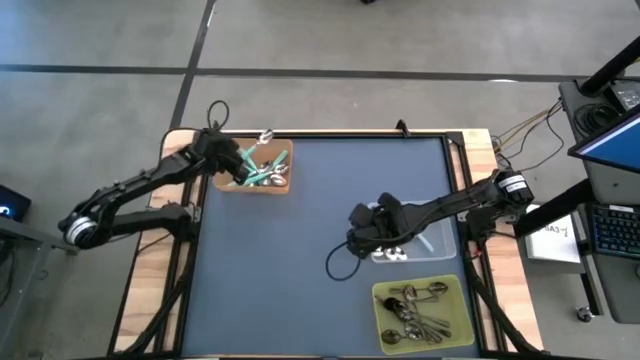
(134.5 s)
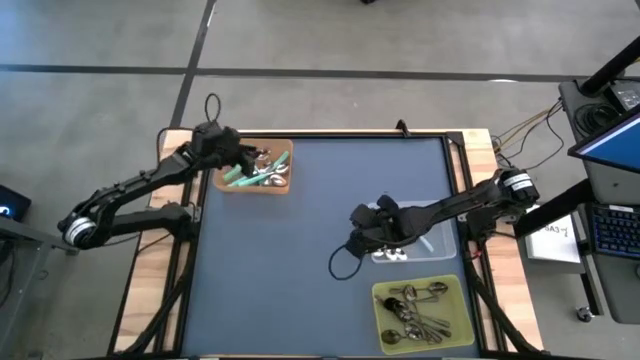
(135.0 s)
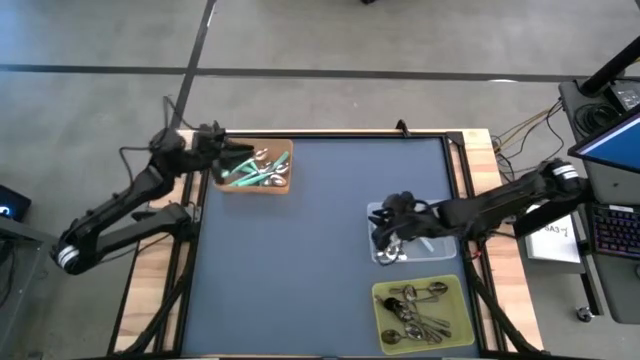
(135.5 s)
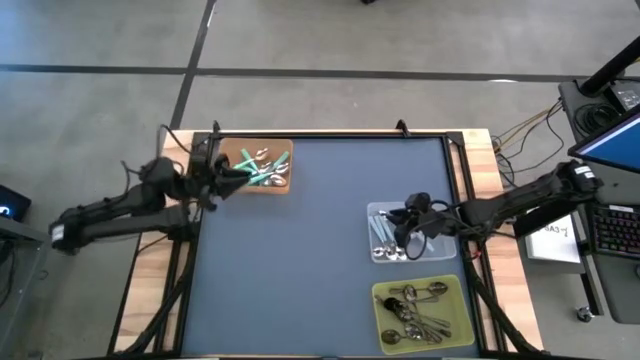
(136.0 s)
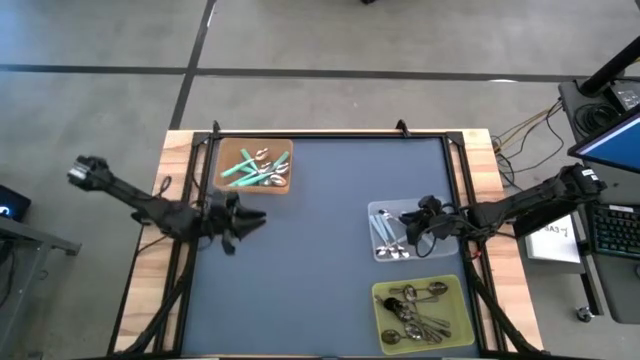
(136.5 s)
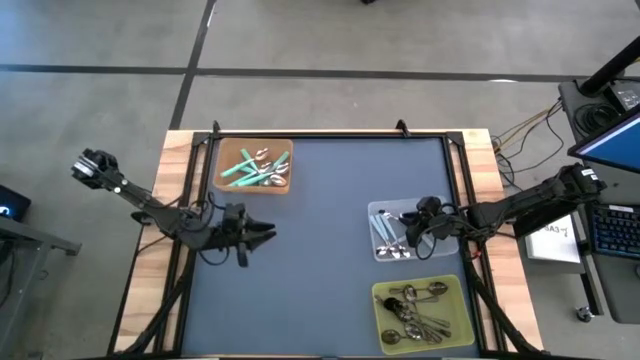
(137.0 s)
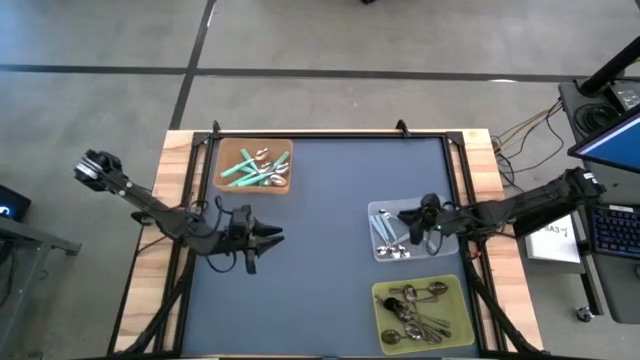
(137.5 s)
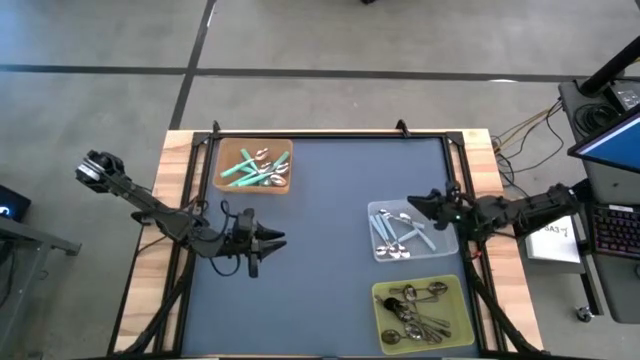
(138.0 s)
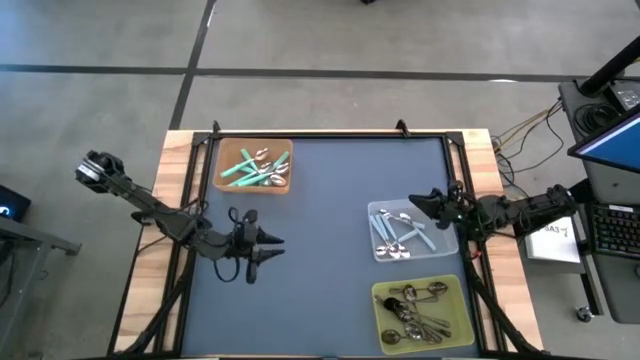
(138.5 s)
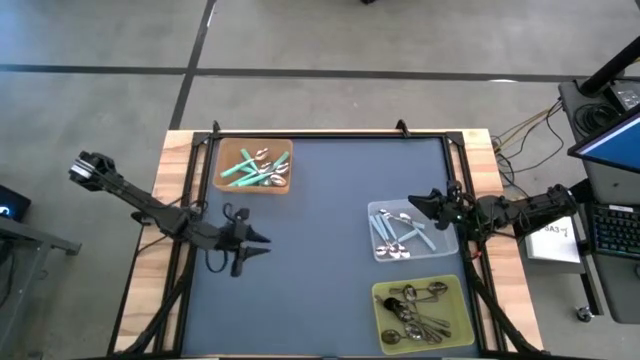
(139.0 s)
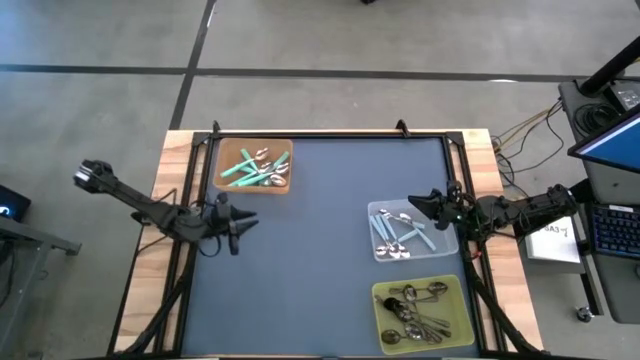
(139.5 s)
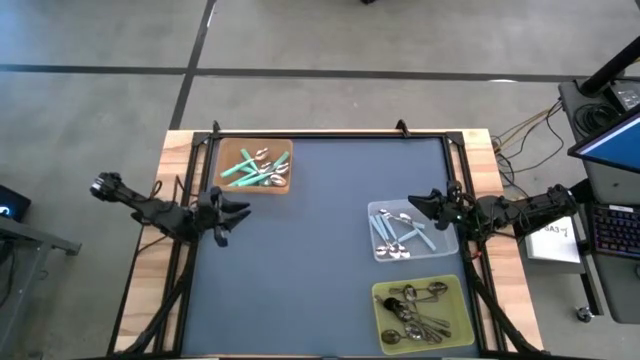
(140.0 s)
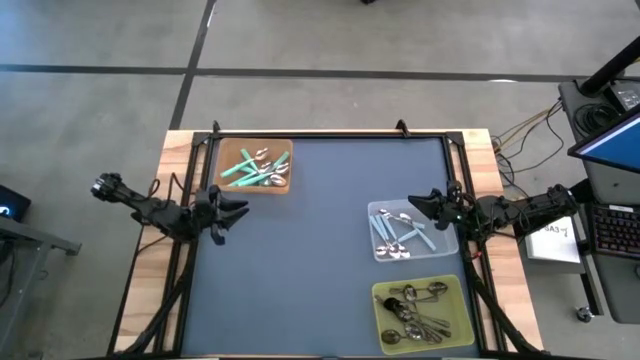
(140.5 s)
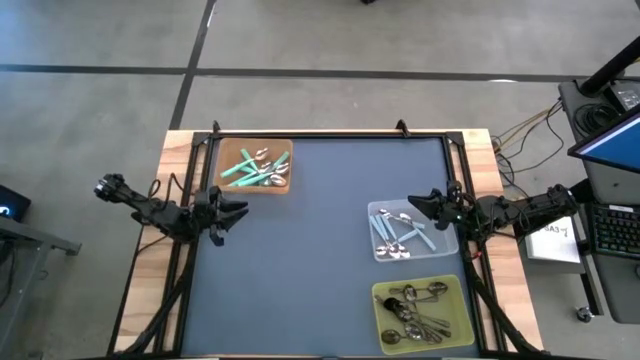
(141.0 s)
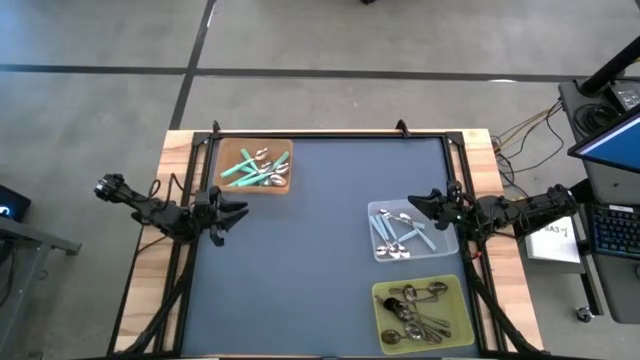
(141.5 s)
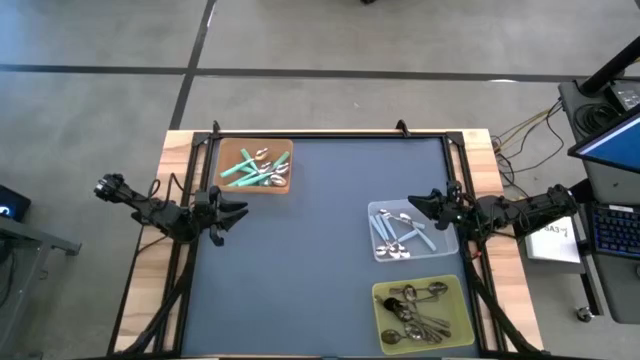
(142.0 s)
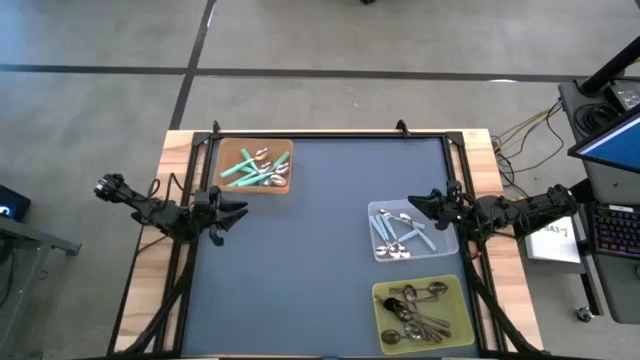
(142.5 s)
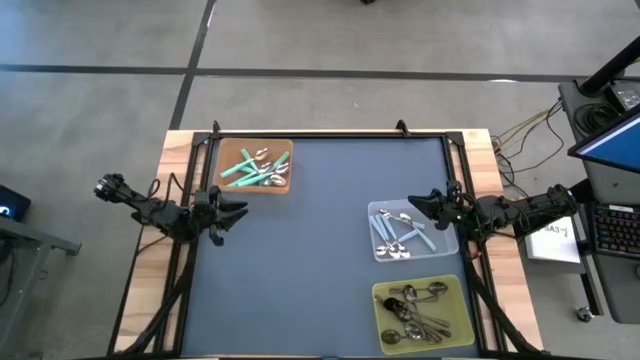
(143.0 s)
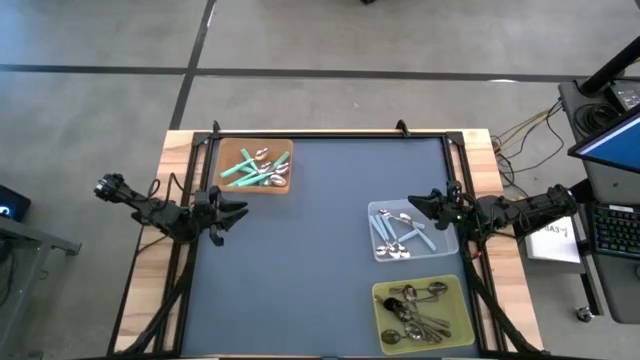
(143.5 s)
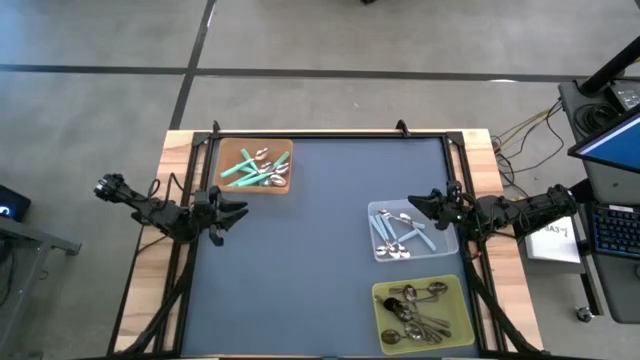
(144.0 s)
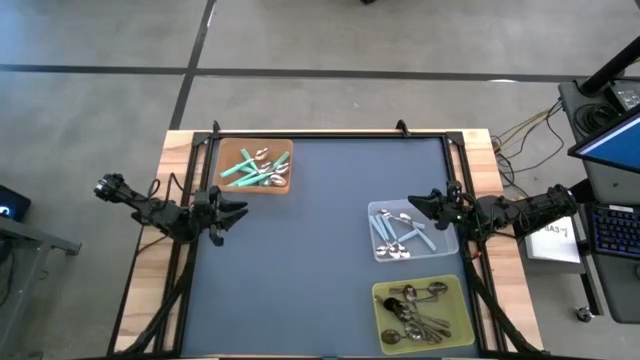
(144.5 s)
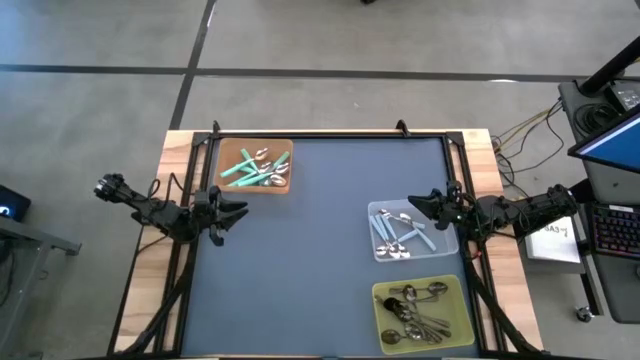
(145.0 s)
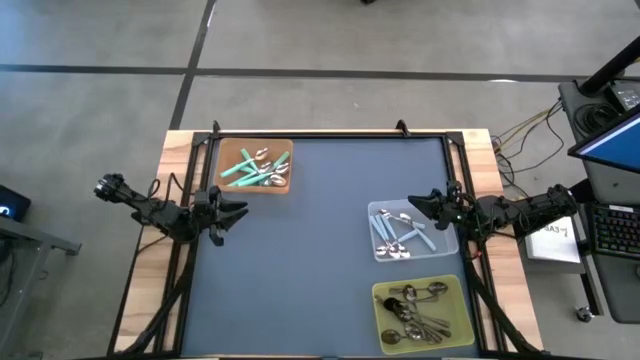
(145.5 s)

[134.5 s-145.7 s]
Task: Sort silverware by color (type)
Return to Home Position

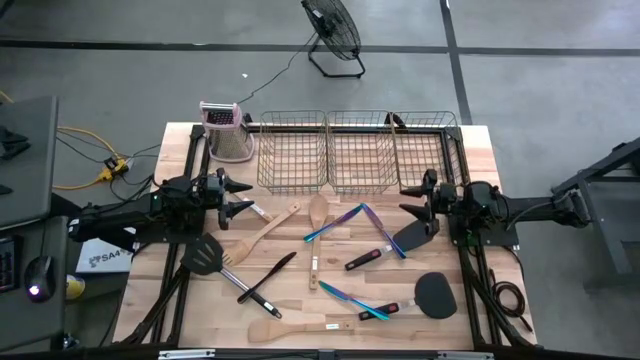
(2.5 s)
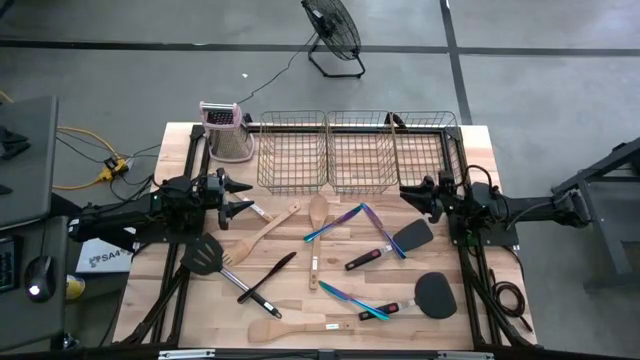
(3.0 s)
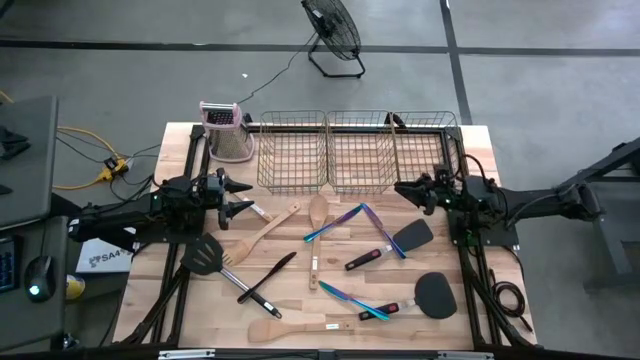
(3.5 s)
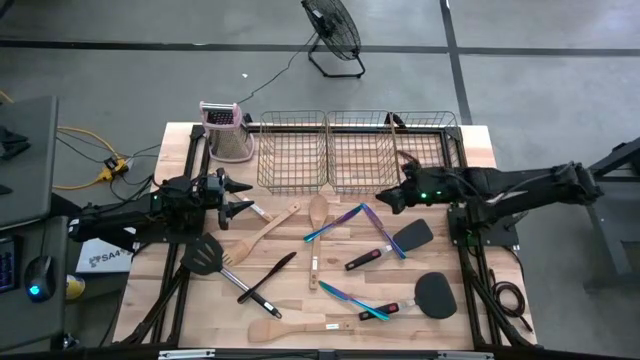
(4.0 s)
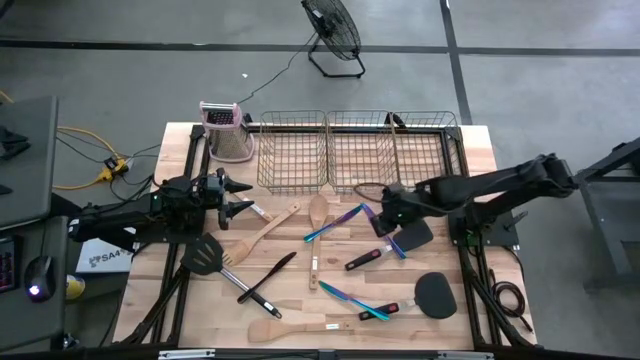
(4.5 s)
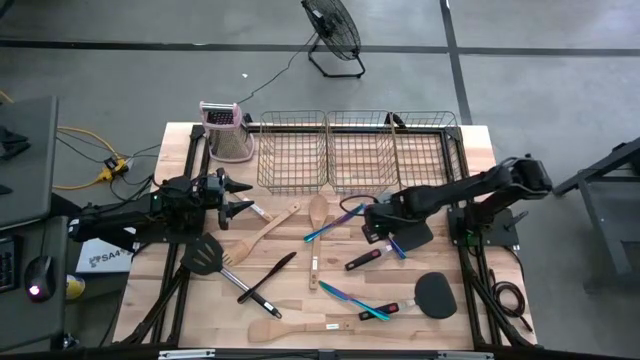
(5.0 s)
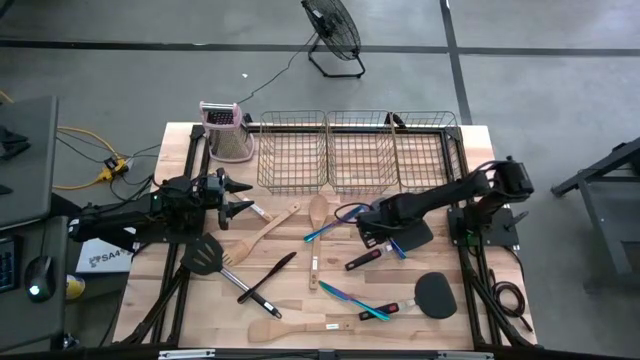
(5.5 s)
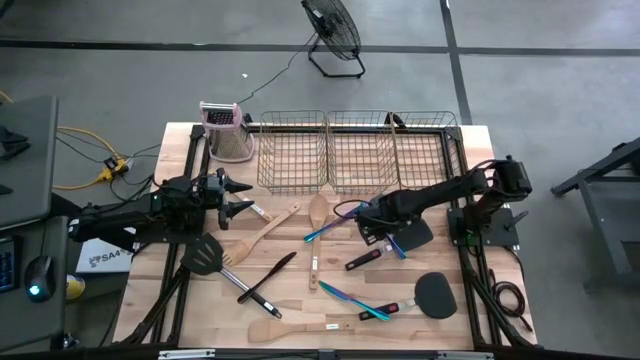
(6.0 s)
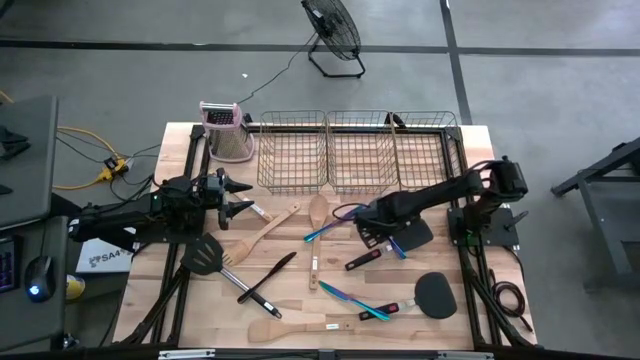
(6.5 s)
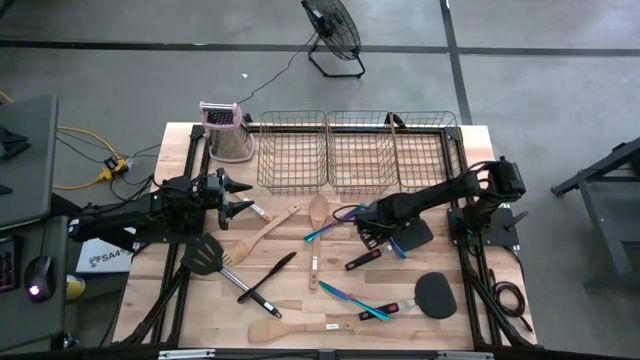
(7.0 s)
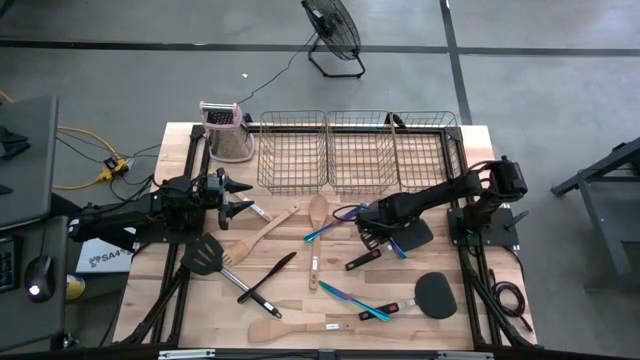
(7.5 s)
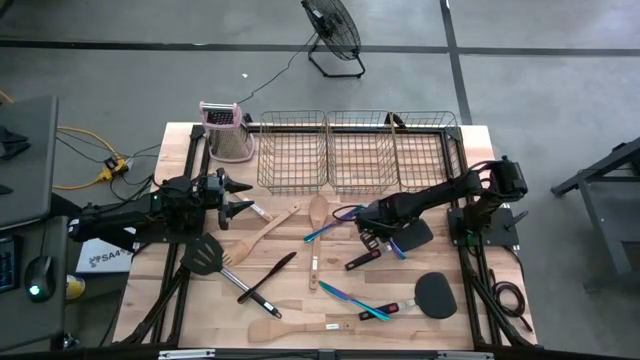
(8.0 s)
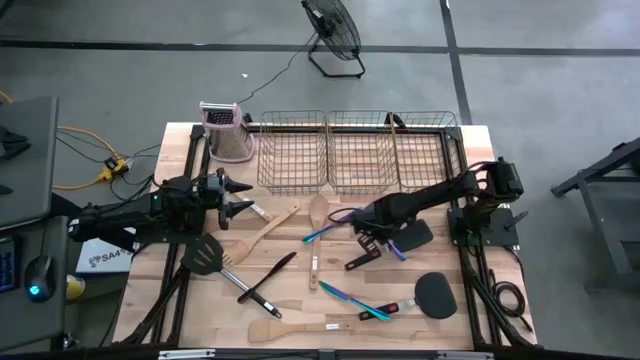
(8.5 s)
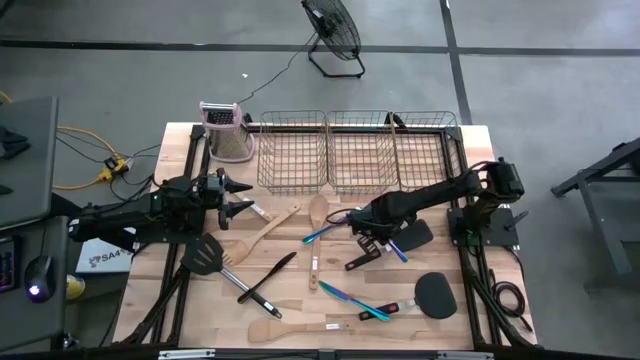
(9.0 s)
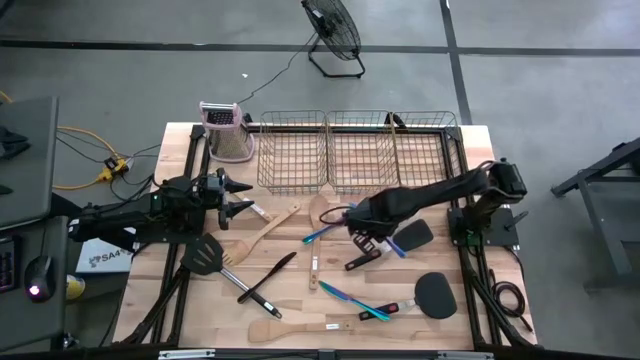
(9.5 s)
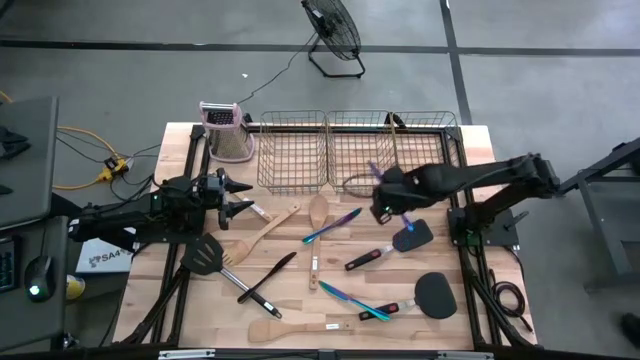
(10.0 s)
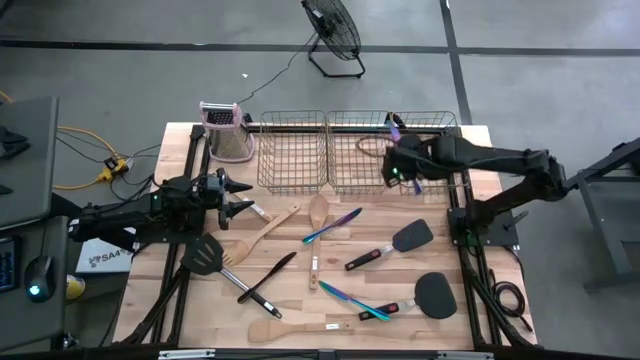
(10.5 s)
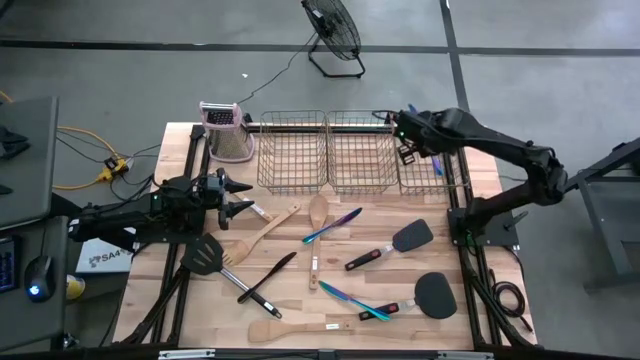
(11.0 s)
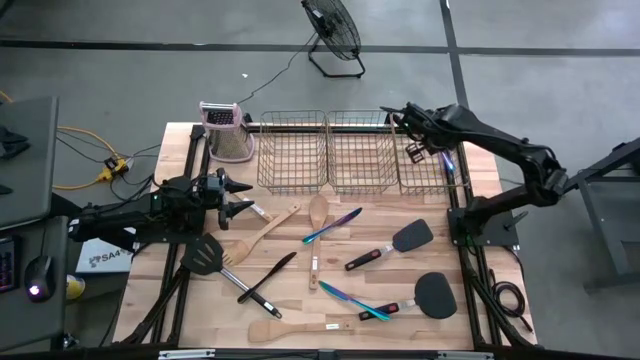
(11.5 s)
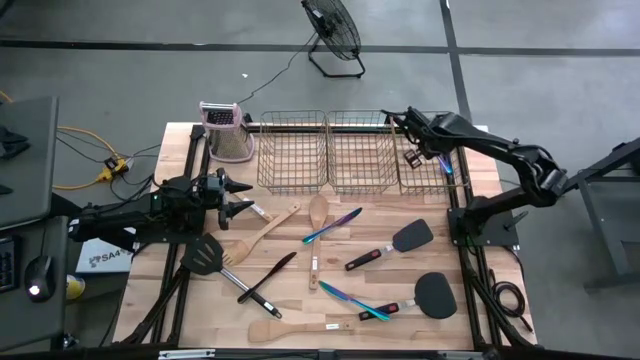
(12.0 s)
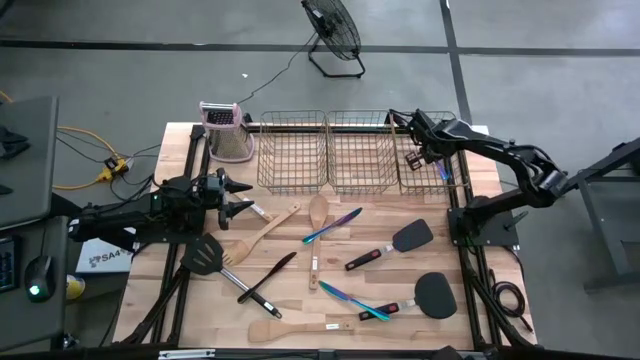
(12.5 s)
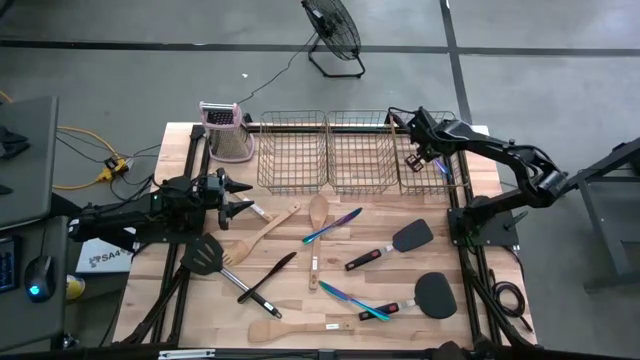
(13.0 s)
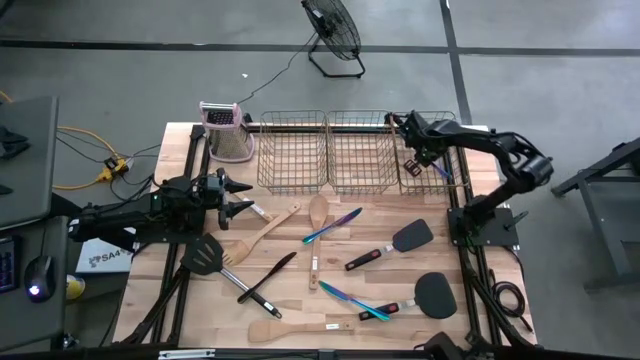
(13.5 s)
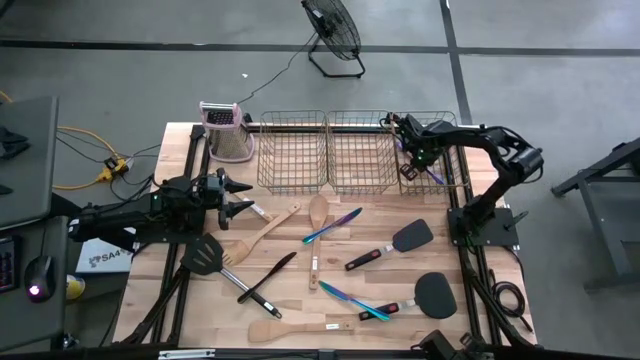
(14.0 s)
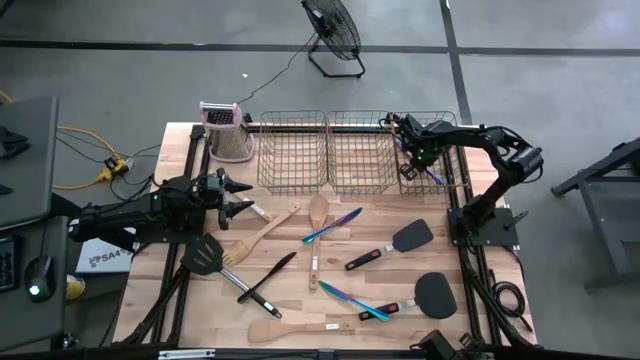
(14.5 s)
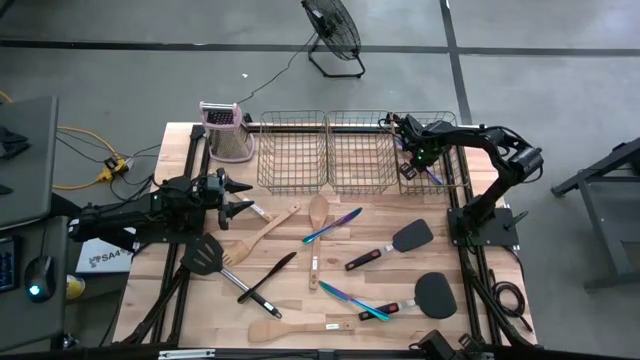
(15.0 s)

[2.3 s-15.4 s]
Task: Pick & Place Kitchen Items
Put the top right blue table knife into the right mesh basket
